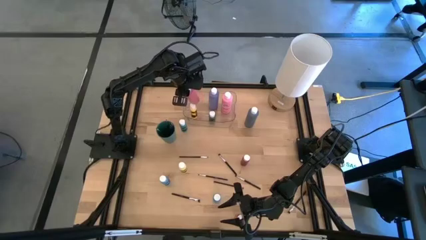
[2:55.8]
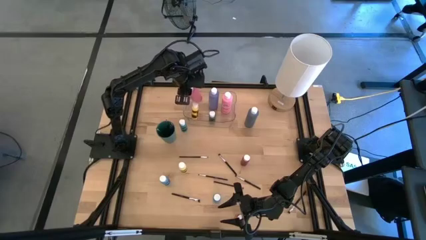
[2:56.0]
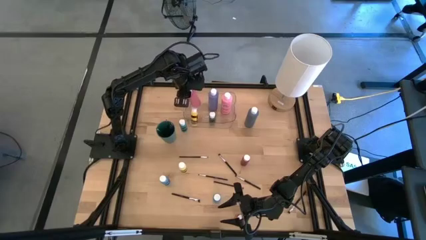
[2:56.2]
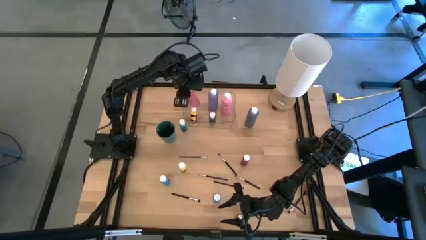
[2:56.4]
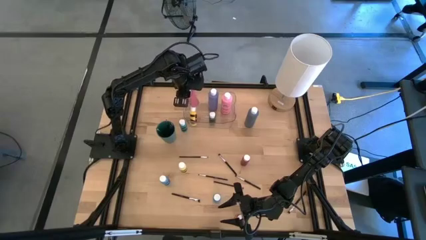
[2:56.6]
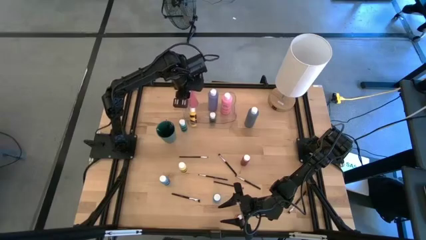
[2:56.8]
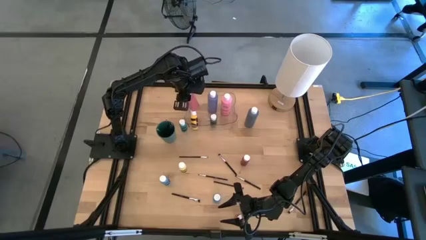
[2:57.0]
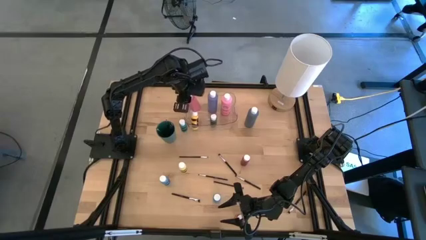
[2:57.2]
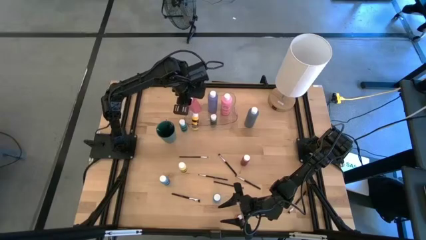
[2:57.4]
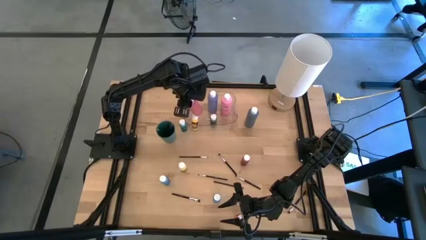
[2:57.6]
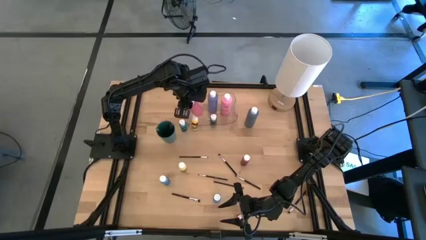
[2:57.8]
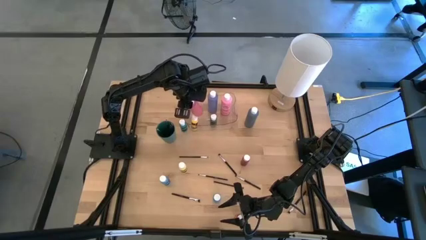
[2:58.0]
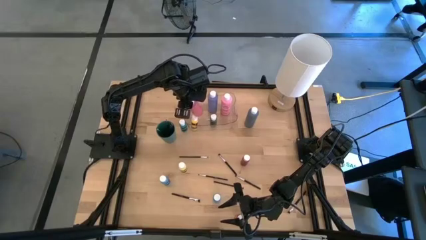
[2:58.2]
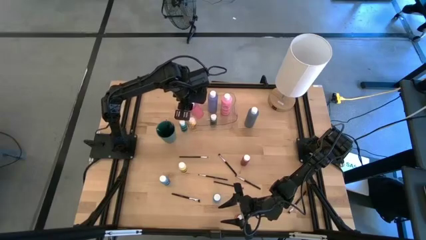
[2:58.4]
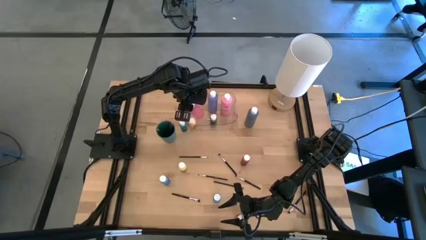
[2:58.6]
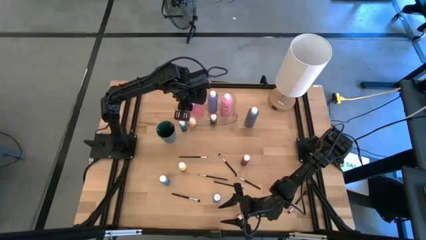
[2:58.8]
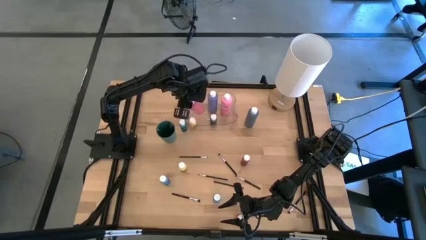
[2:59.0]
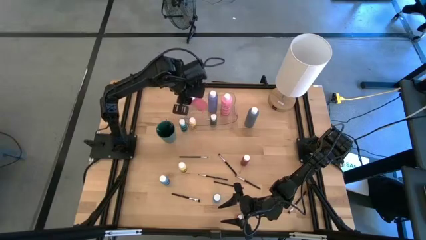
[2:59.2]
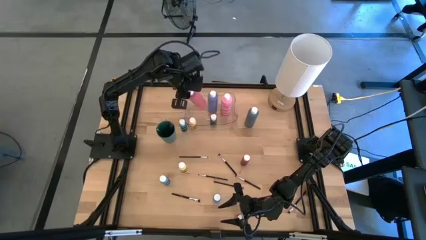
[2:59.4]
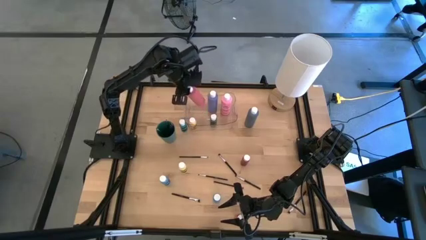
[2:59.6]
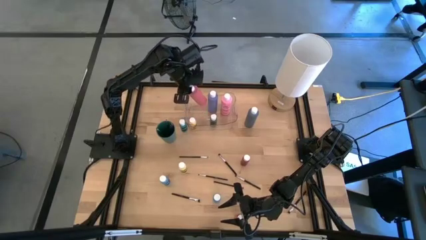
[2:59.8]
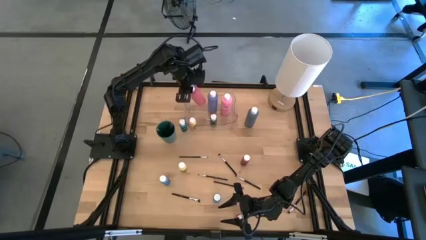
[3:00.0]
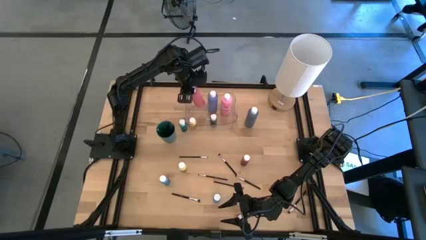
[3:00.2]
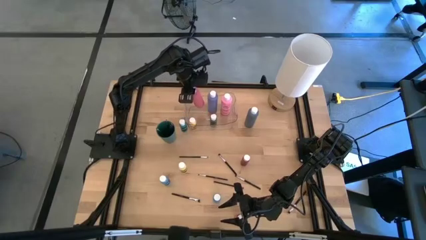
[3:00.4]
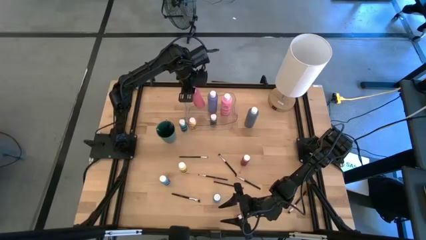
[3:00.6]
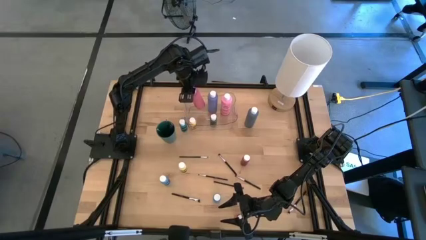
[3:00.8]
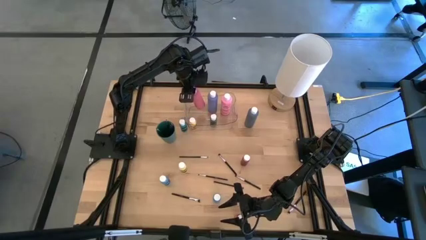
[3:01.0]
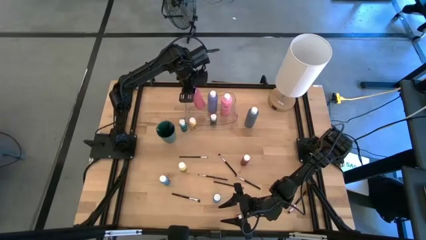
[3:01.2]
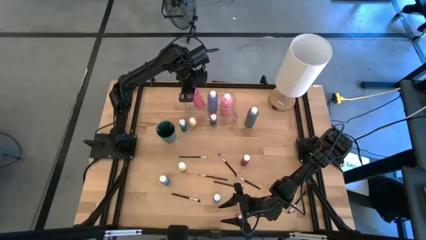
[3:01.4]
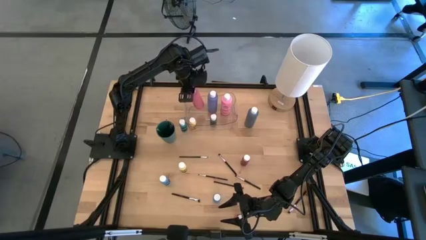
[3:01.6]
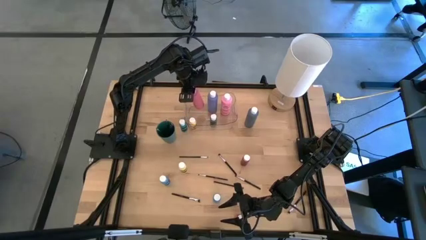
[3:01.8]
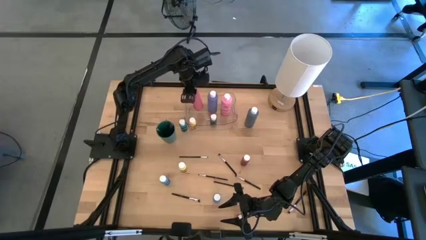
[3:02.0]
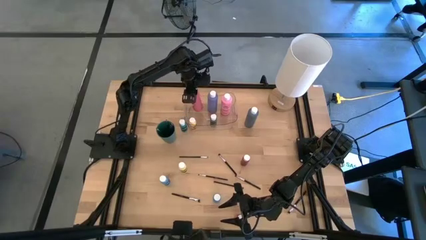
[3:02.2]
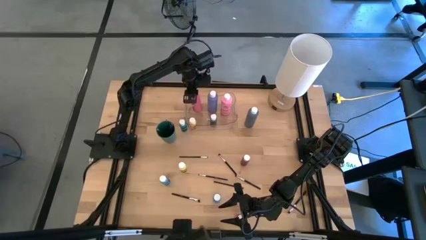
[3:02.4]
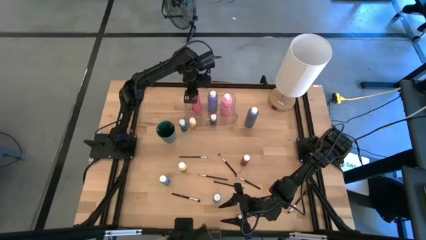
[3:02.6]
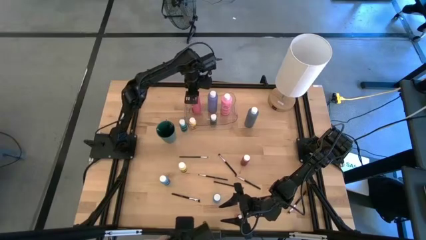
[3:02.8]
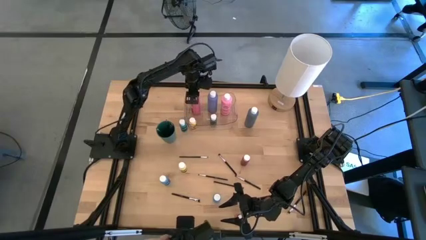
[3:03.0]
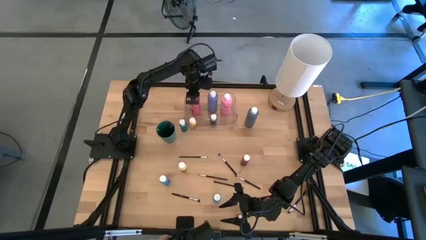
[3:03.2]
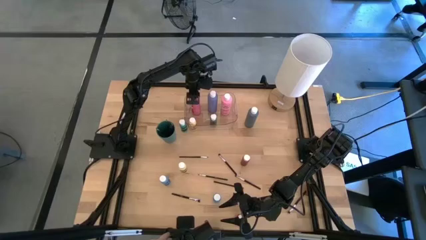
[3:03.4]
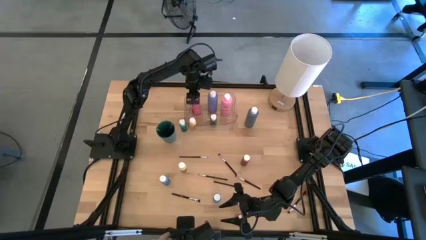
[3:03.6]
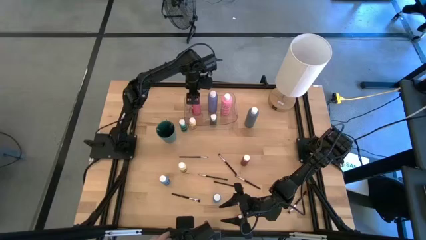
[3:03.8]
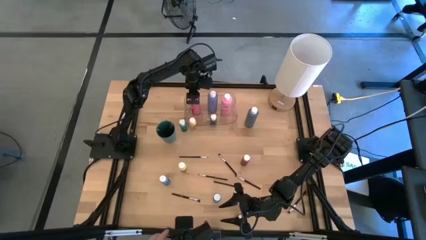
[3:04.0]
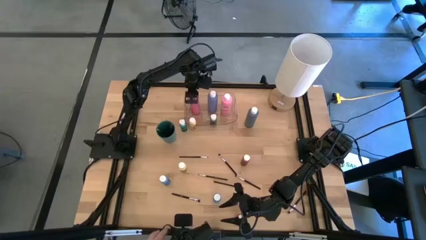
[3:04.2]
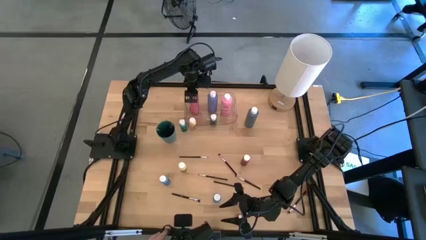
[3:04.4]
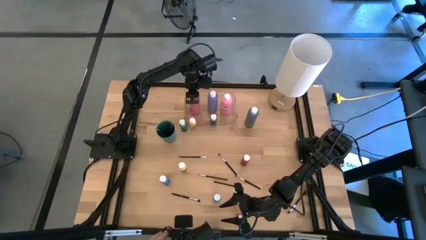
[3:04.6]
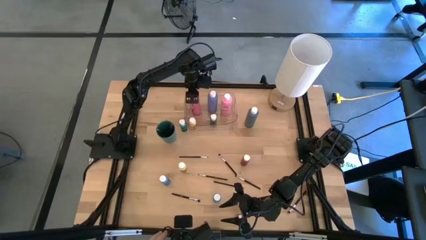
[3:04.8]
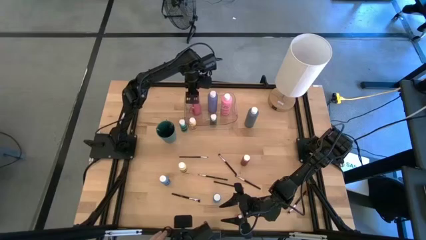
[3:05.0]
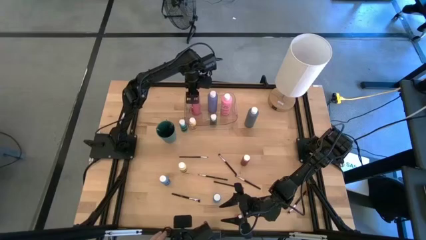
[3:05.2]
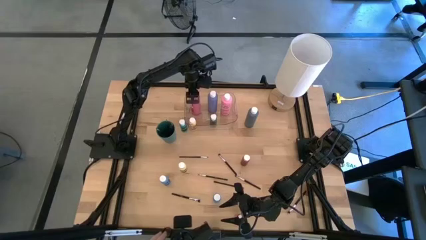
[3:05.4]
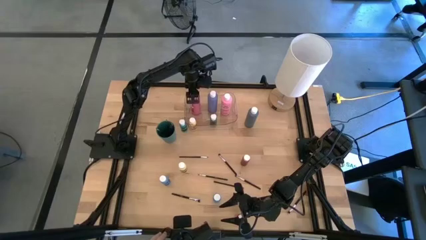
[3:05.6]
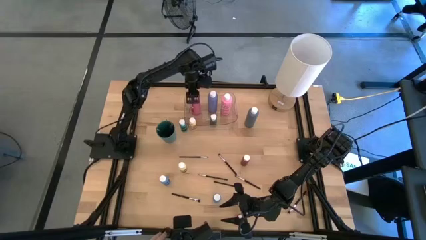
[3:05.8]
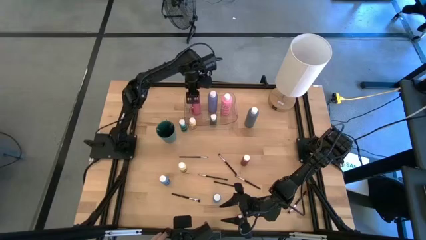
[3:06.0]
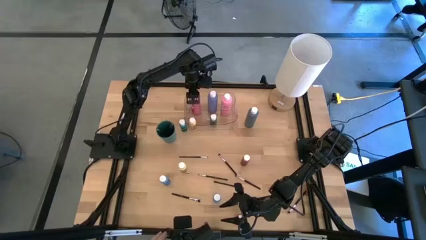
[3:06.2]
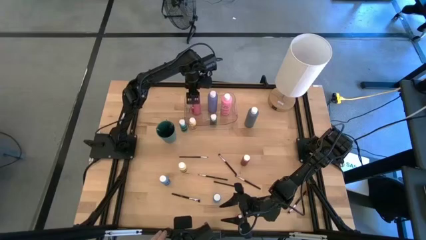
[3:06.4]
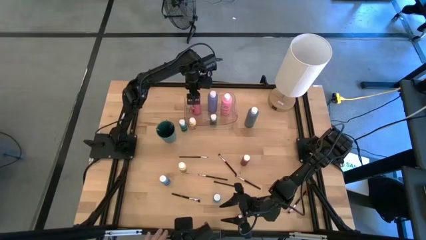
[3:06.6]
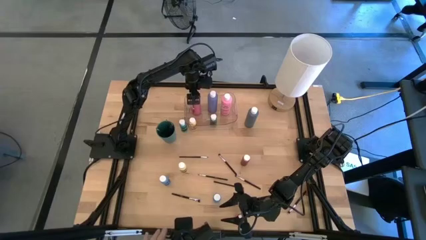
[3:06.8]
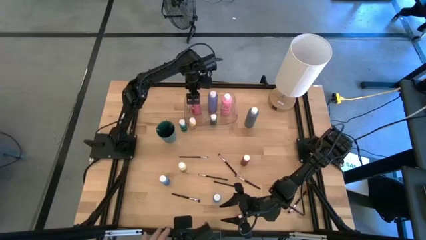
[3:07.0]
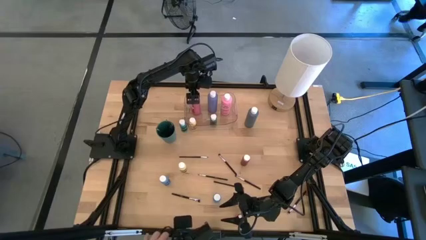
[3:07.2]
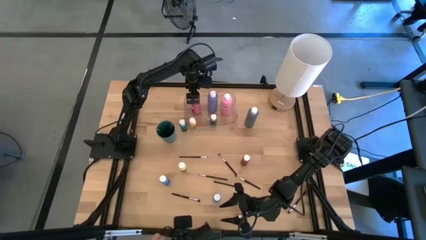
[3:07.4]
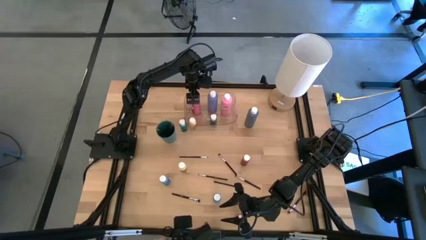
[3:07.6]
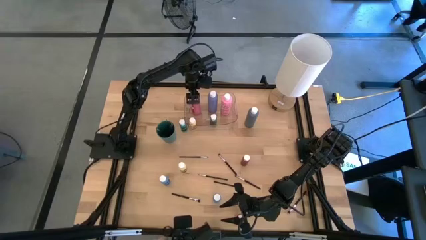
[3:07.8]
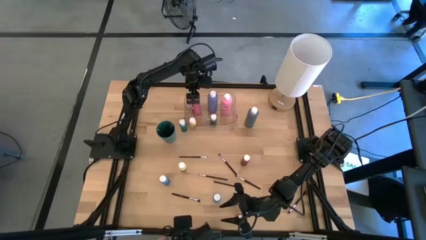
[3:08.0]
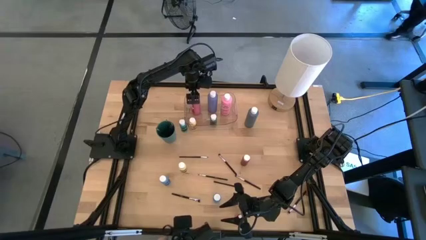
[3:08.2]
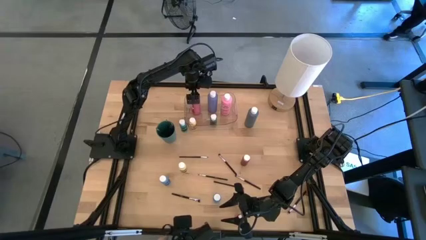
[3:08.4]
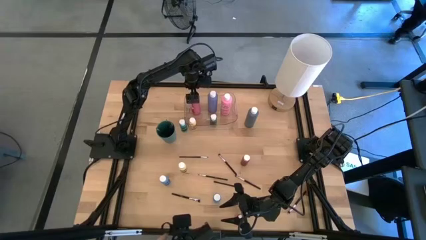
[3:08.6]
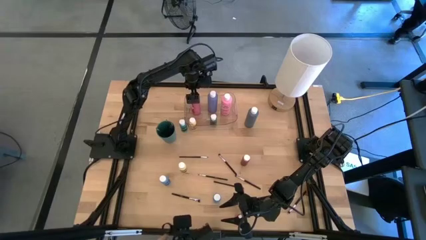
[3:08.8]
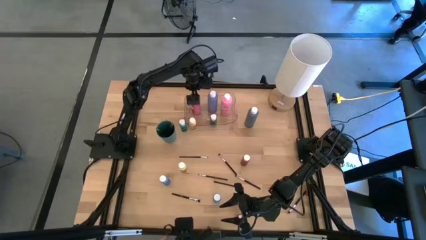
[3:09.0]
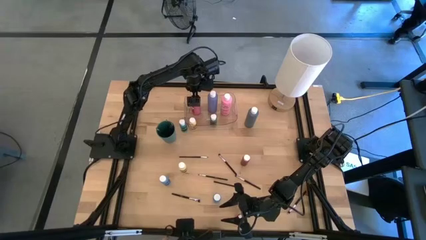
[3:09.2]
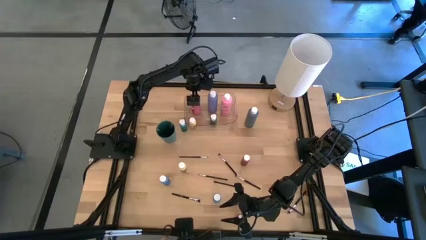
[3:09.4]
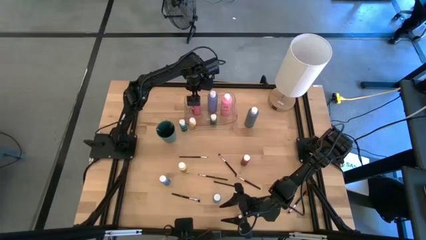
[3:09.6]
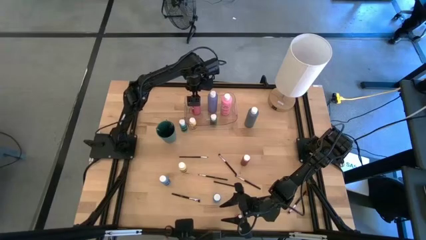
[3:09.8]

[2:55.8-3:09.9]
Task: Pick & Place Paint Supplies
Put the pink paint bottle into the transparent bin

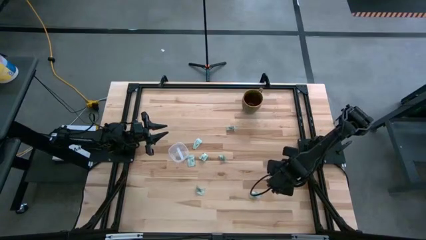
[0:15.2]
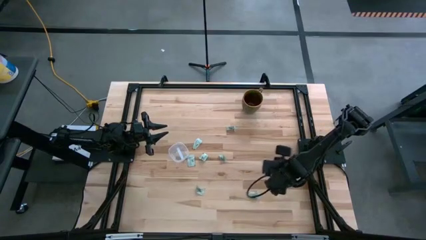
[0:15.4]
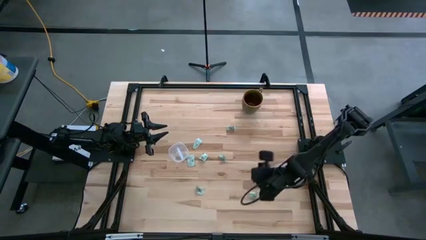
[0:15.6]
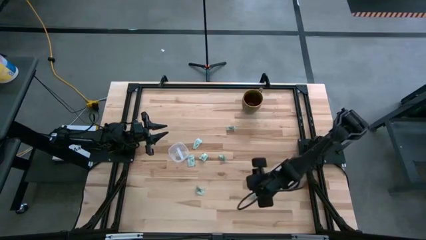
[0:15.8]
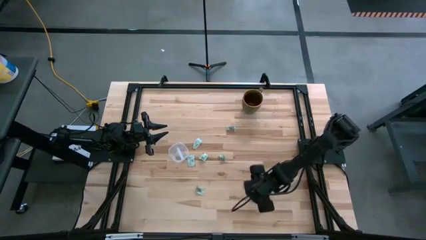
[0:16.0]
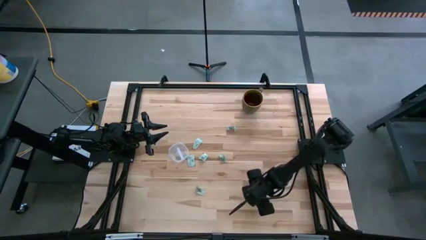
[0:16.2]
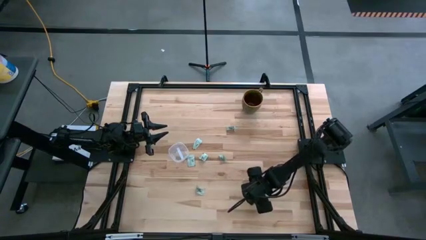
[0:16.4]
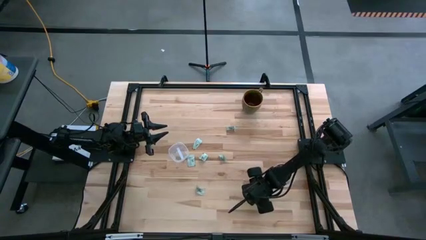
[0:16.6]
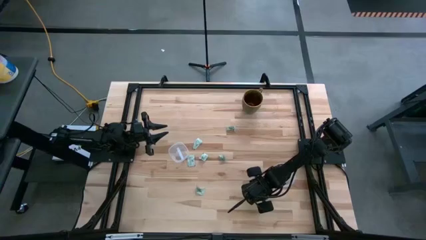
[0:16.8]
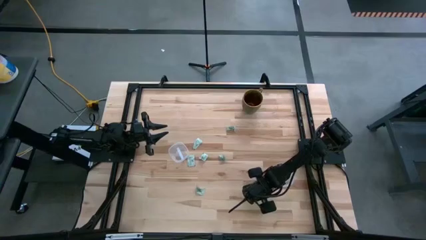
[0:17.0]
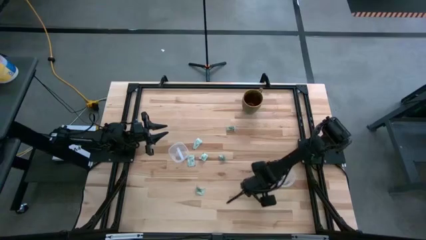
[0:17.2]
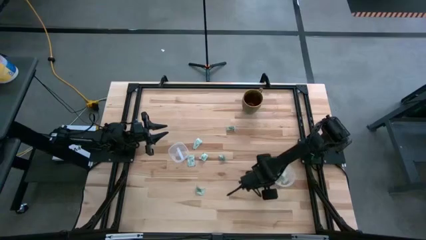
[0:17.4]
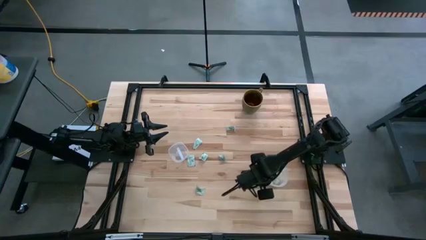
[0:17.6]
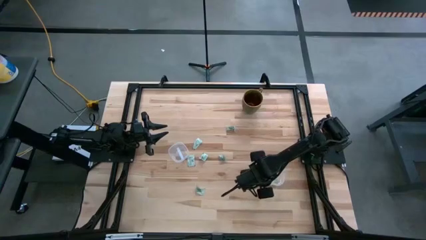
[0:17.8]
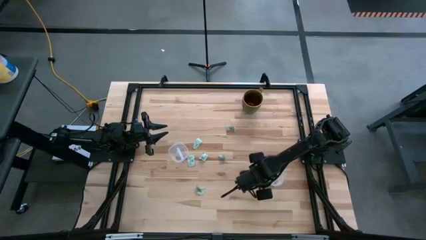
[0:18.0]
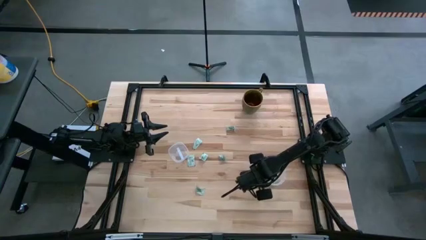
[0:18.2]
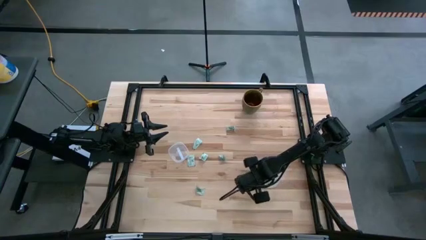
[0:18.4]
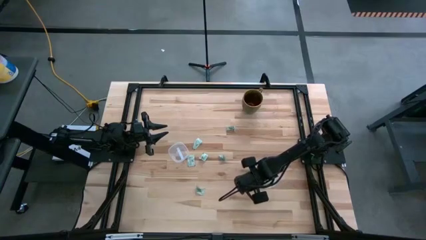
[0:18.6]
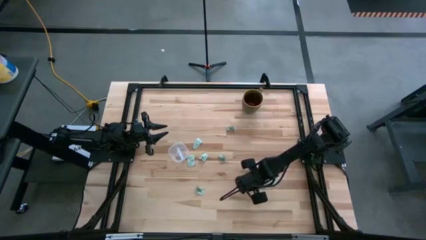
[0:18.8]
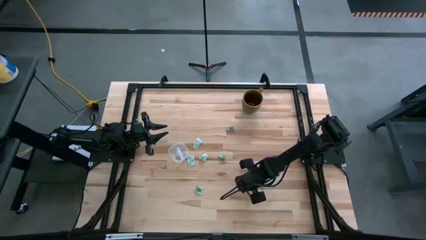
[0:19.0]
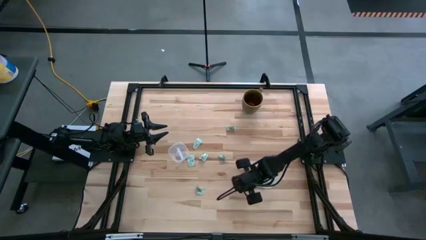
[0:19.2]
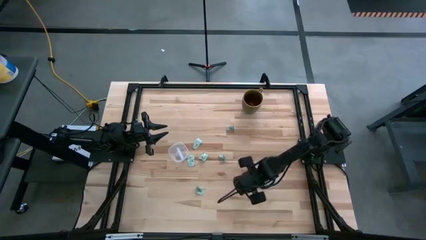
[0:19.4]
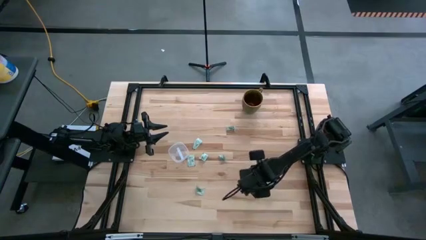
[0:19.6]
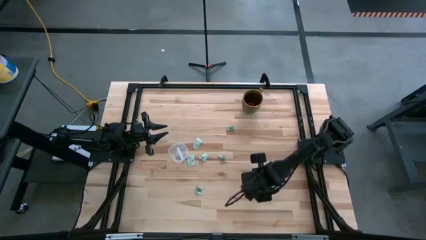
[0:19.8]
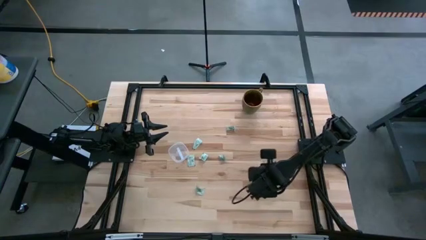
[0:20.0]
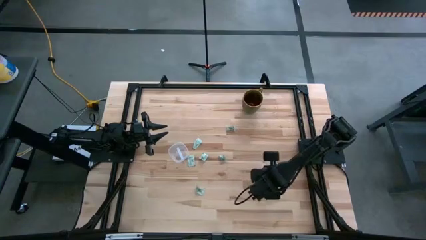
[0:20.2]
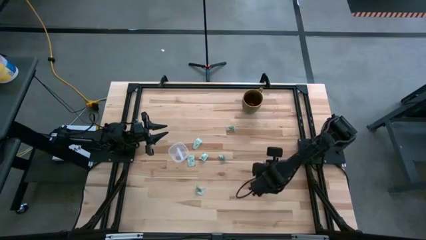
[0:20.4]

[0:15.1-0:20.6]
Task: Pick and place Stevia / Truvia into bins
Put the stevia packet into the round transparent container
